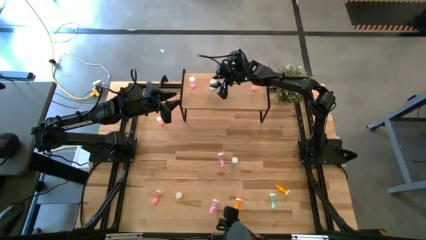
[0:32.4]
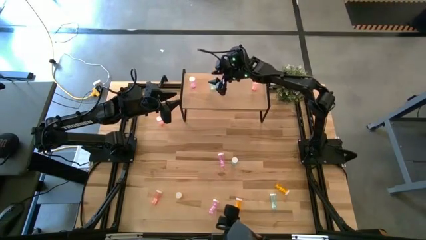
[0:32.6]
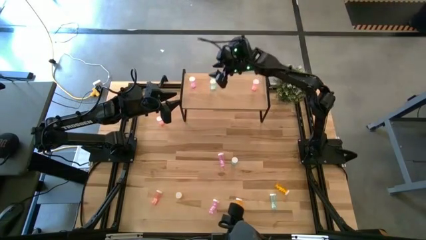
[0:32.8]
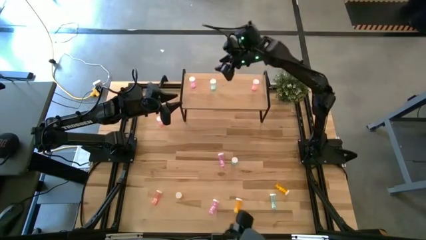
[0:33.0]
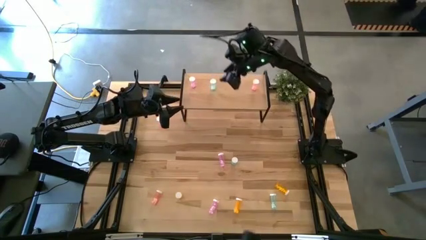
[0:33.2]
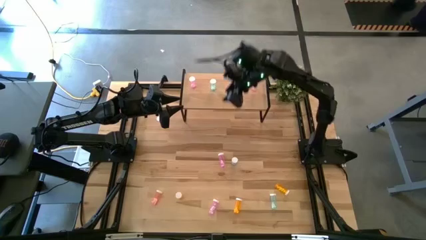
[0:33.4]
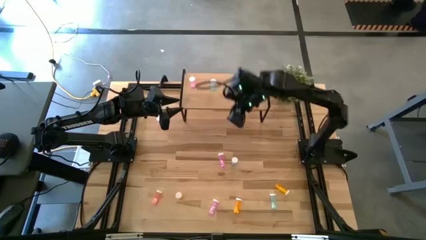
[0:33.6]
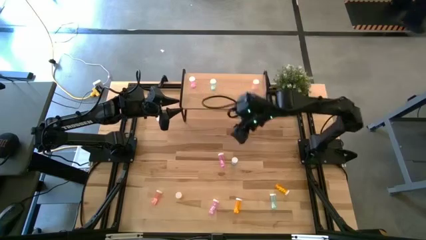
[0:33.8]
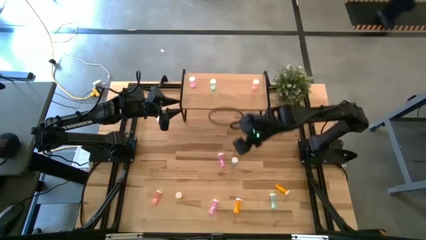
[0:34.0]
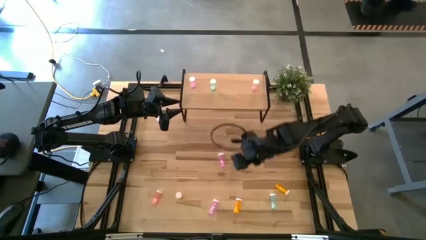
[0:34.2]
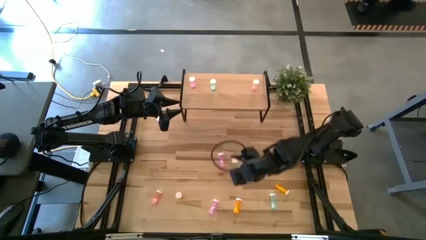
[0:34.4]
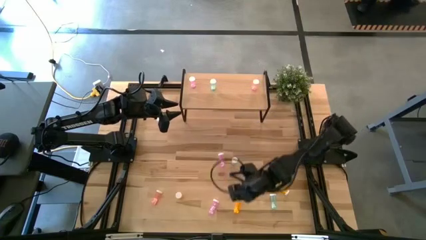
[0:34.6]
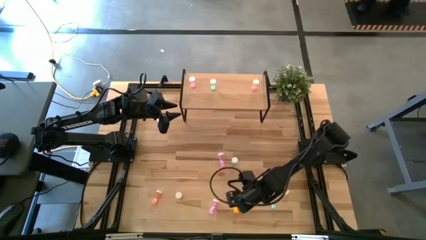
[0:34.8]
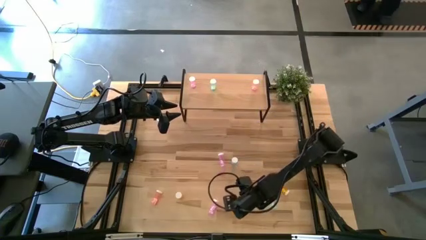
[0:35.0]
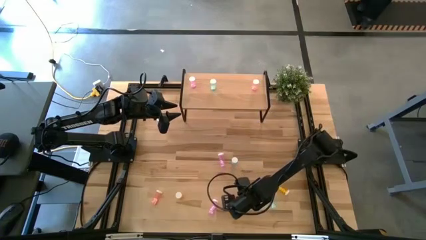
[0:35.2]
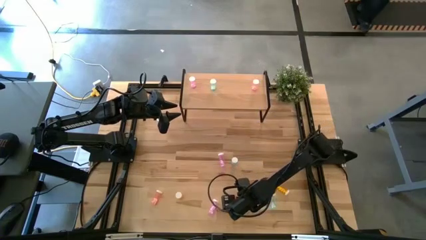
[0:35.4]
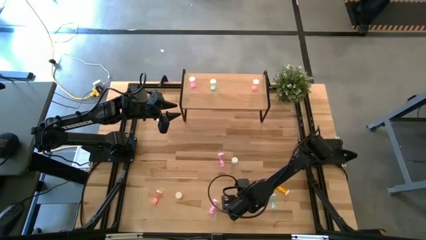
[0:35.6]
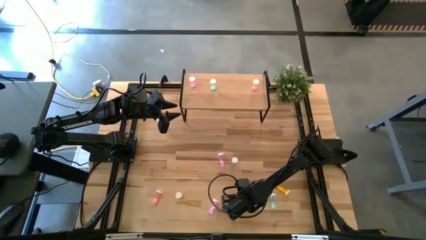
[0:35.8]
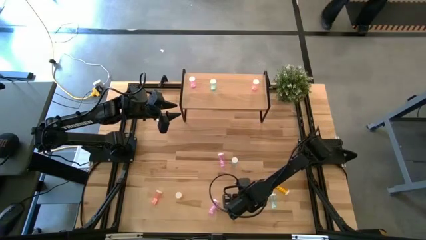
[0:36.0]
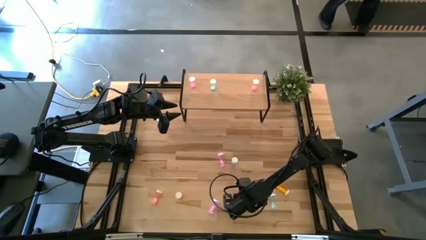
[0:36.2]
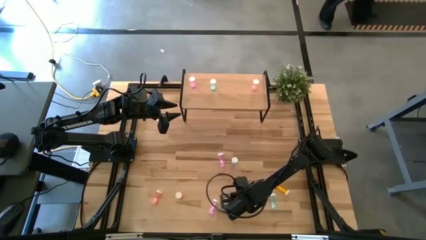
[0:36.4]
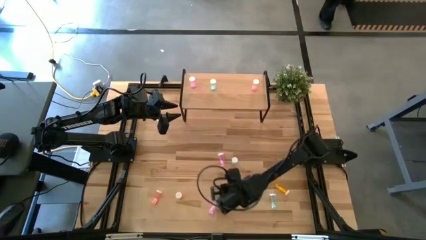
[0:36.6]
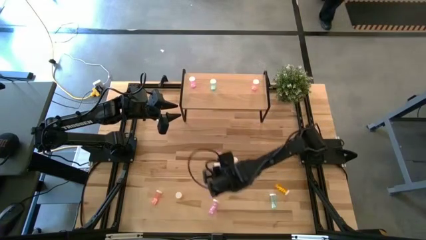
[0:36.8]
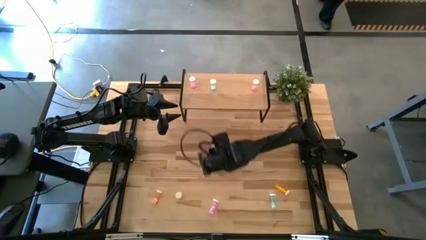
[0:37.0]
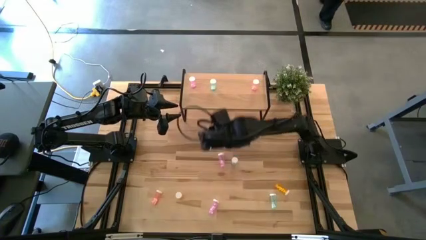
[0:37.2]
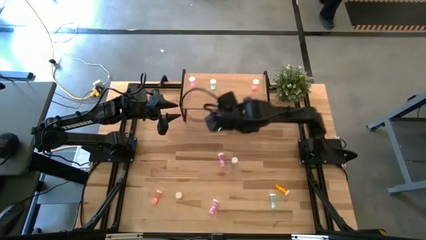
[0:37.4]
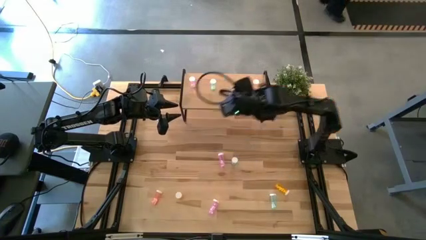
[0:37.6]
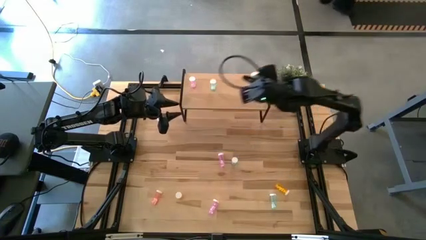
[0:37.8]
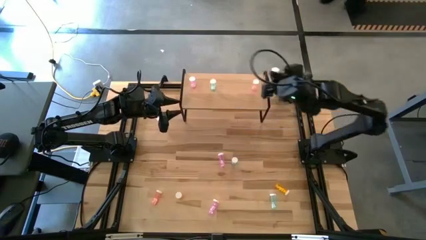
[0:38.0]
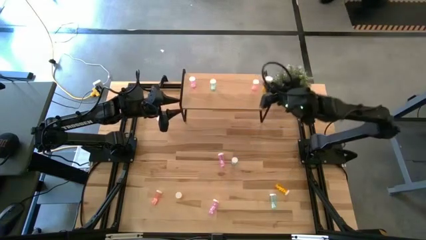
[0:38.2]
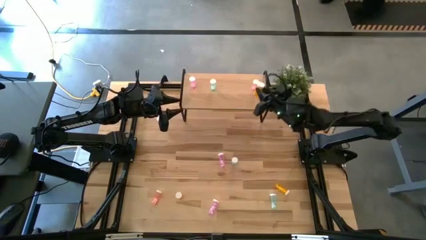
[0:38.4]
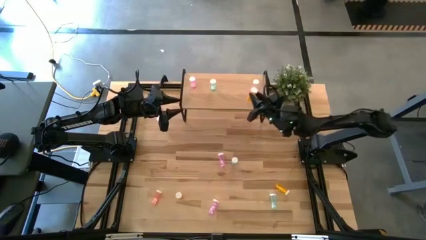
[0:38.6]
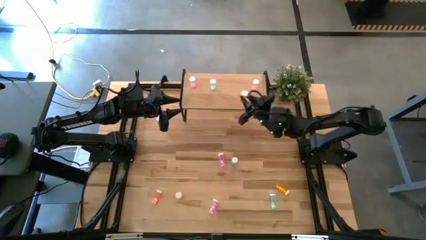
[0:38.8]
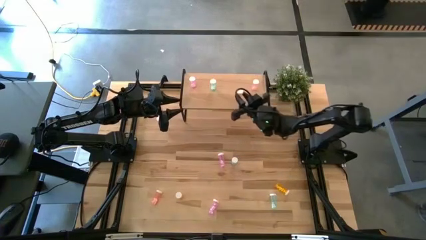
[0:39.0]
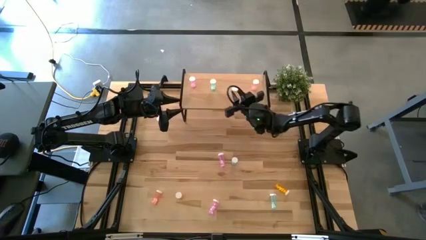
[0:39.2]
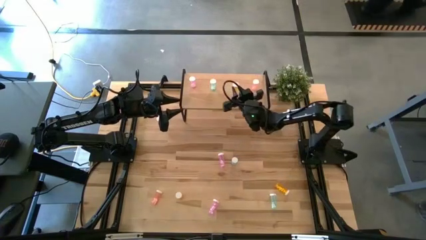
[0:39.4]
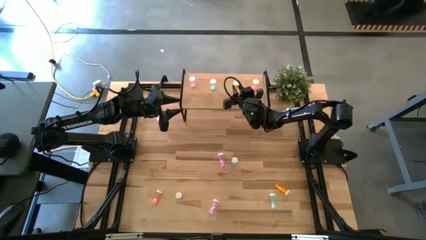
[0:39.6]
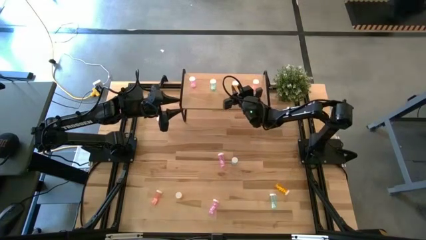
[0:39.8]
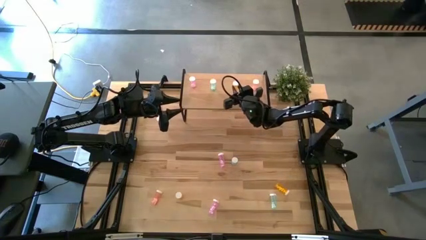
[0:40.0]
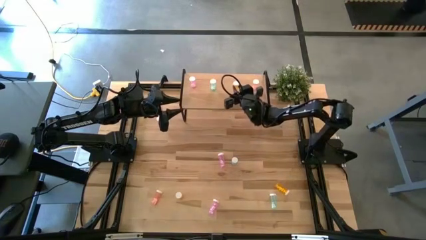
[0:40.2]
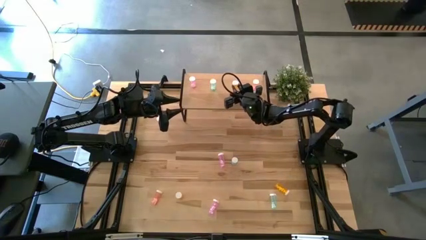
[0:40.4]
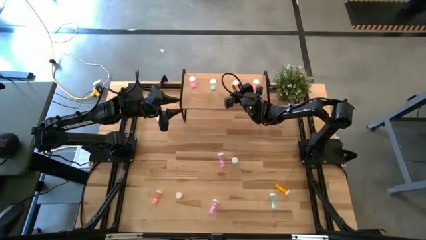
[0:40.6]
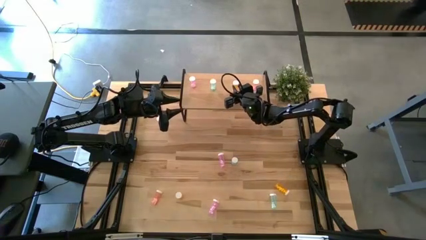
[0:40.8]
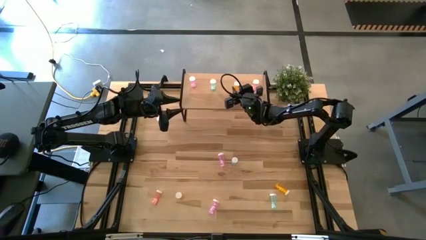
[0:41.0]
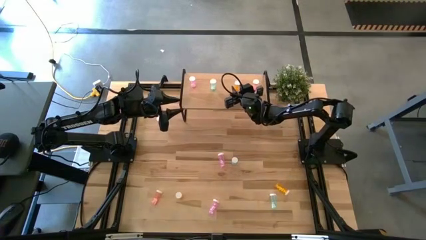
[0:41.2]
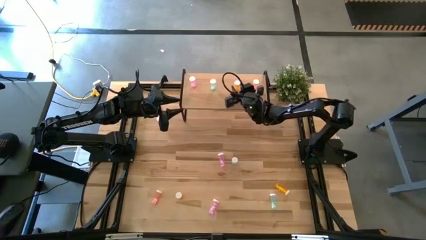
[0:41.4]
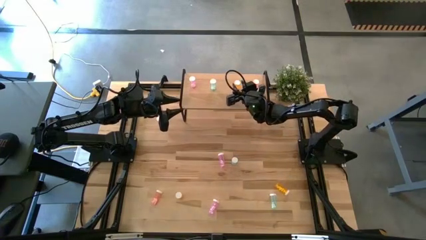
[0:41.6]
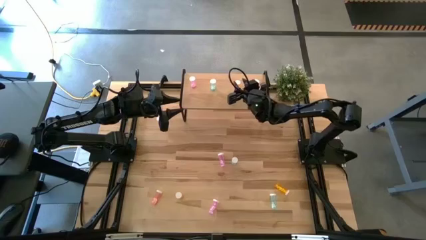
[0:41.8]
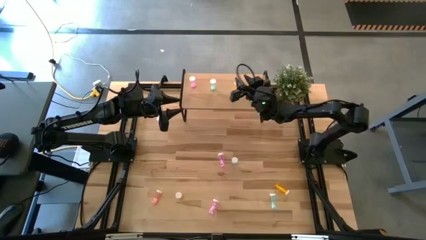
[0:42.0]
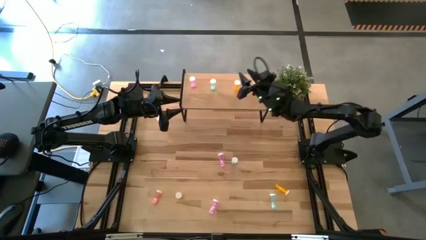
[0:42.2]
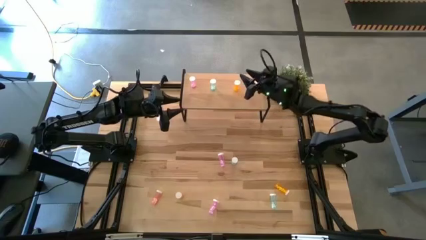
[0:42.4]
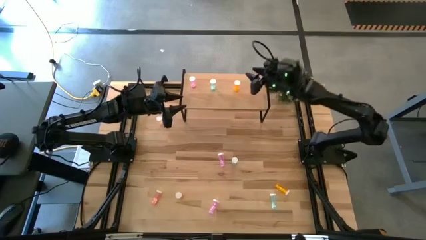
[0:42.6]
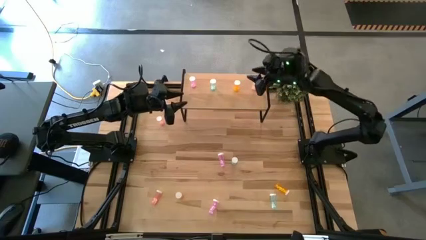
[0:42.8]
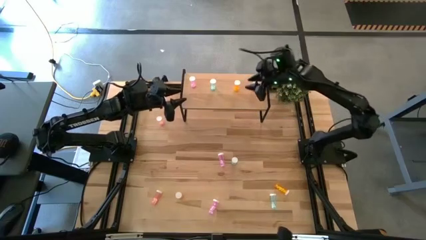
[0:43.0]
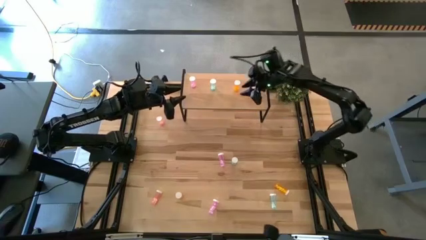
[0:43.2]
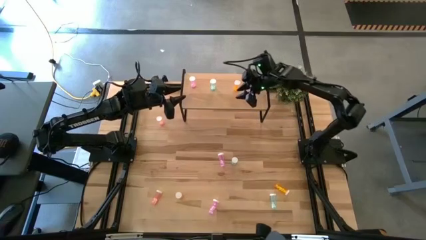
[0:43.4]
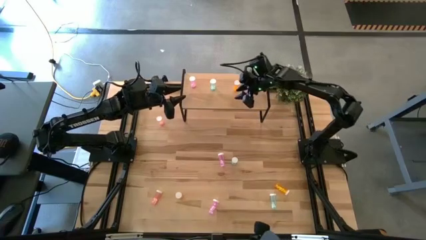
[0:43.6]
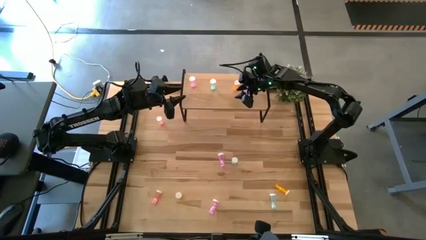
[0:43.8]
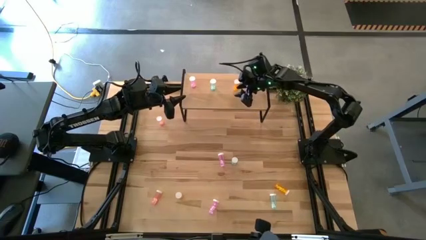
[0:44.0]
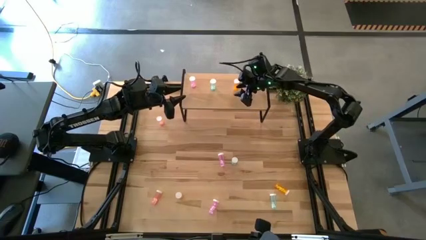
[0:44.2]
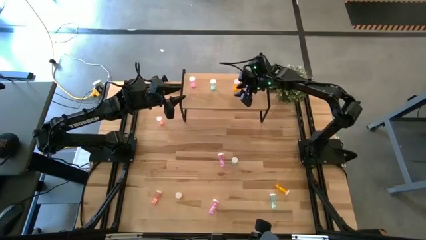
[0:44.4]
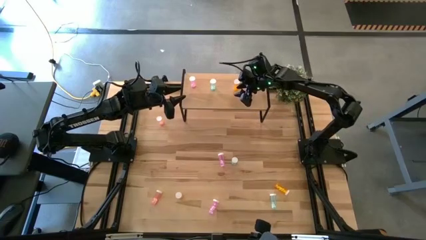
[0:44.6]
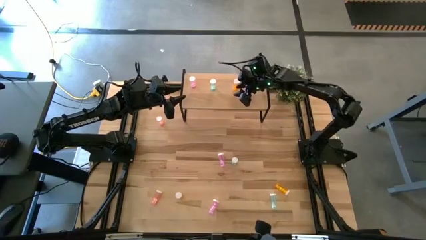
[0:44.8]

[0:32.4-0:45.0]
Task: Pick and place medicine bottles onto shelf by color
Put the center orange pill bottle on the shelf
